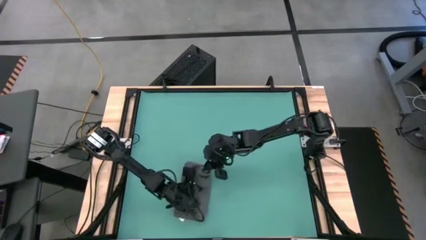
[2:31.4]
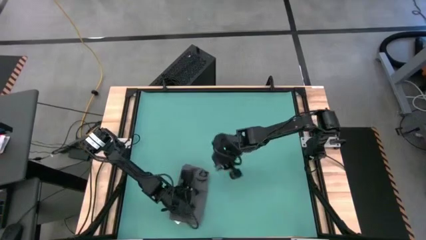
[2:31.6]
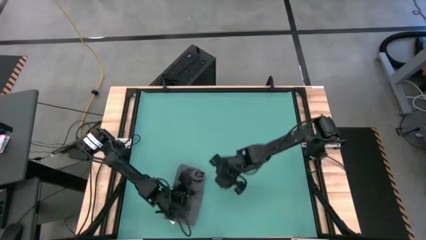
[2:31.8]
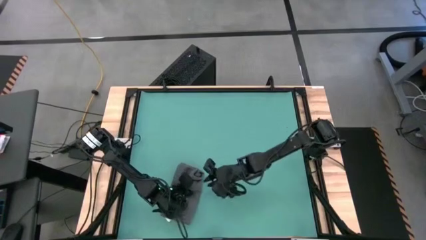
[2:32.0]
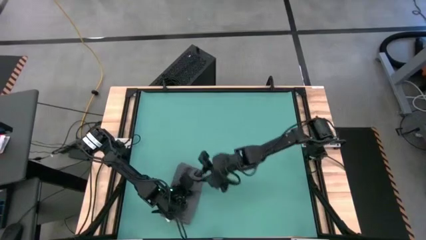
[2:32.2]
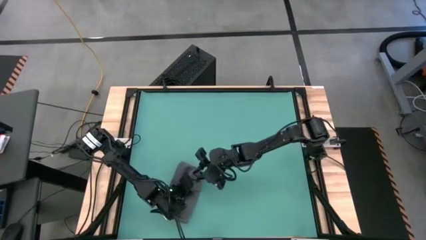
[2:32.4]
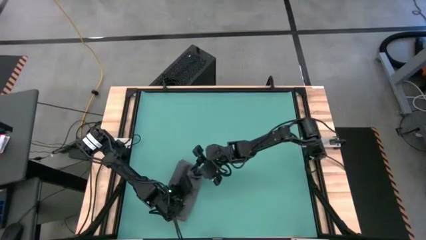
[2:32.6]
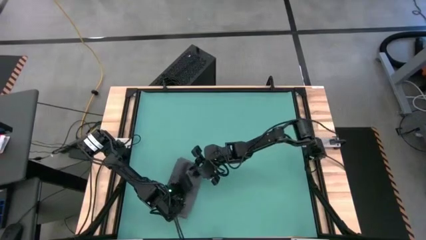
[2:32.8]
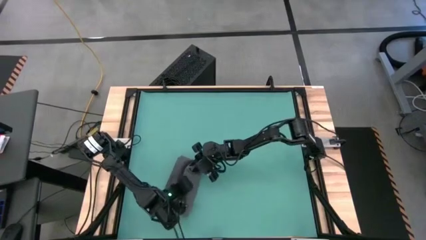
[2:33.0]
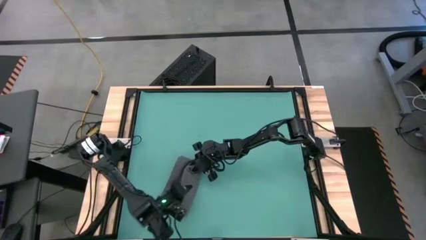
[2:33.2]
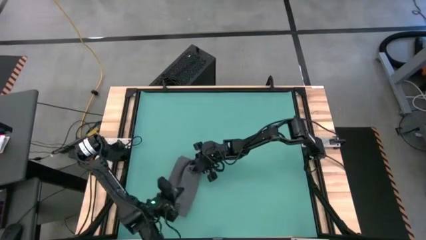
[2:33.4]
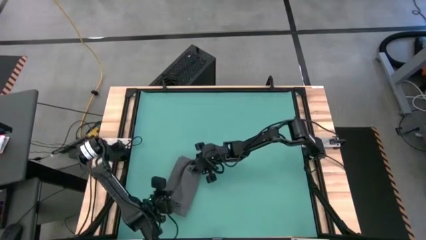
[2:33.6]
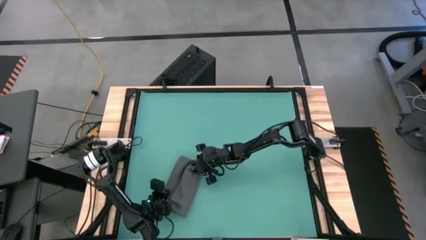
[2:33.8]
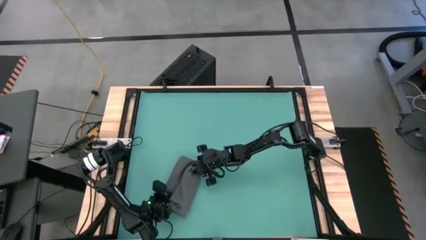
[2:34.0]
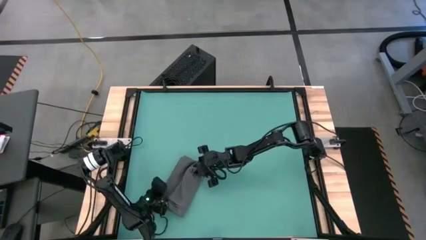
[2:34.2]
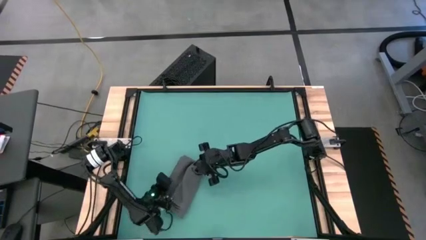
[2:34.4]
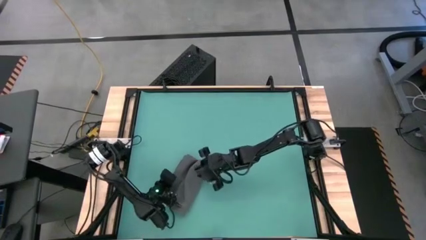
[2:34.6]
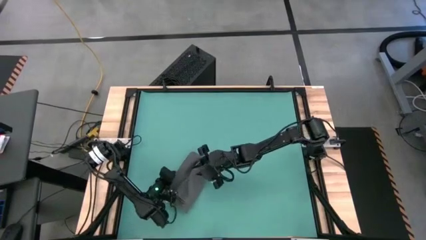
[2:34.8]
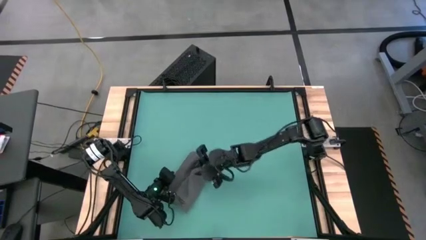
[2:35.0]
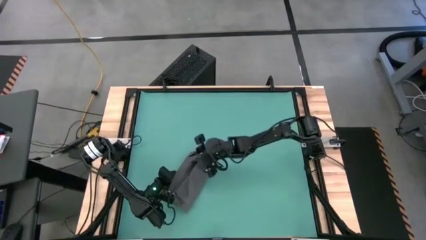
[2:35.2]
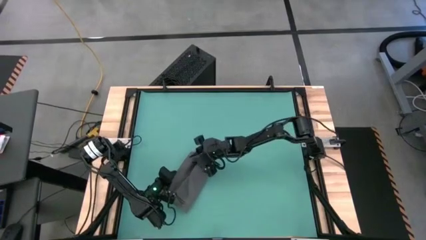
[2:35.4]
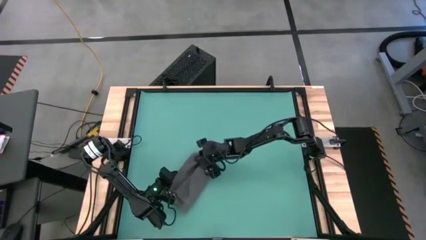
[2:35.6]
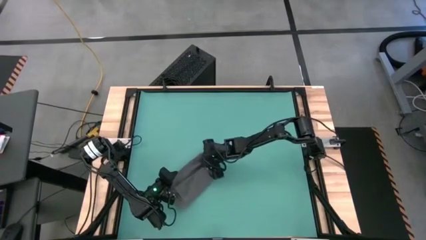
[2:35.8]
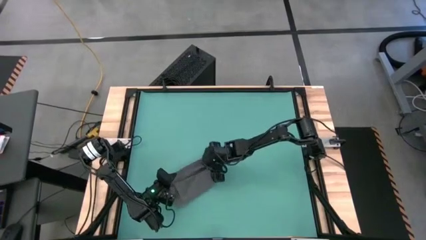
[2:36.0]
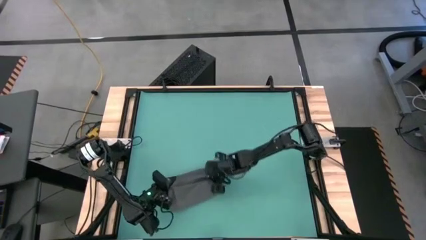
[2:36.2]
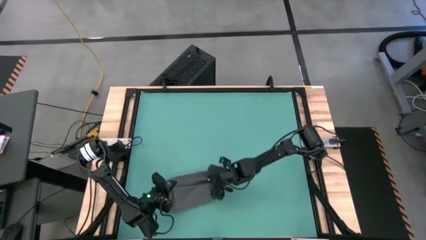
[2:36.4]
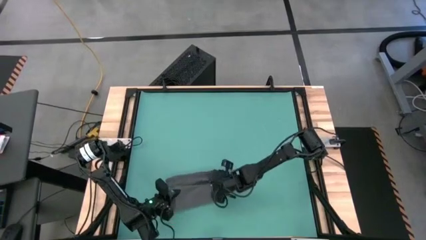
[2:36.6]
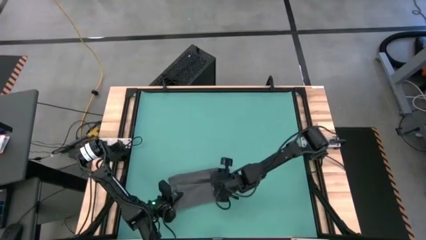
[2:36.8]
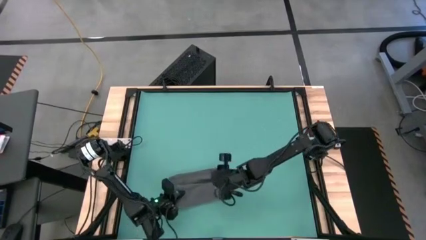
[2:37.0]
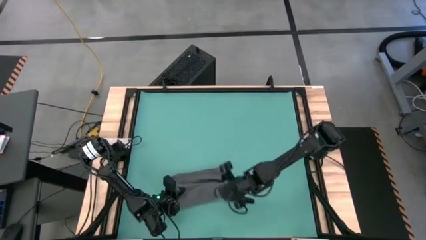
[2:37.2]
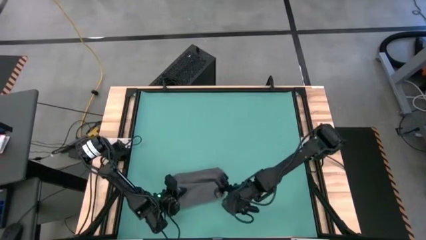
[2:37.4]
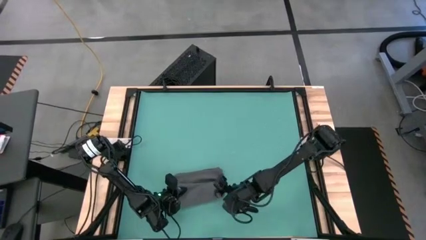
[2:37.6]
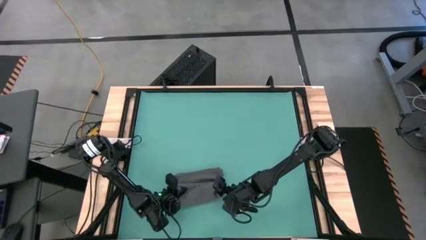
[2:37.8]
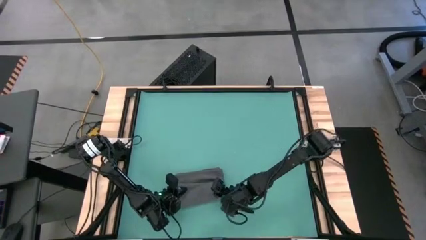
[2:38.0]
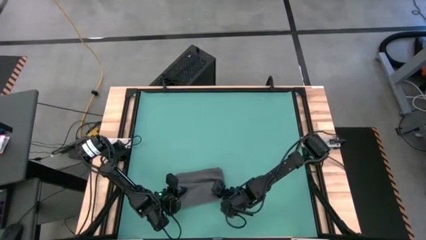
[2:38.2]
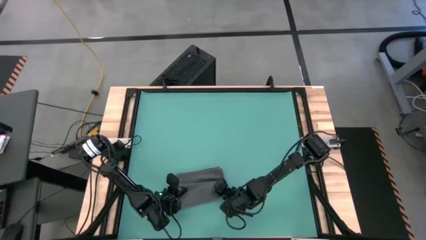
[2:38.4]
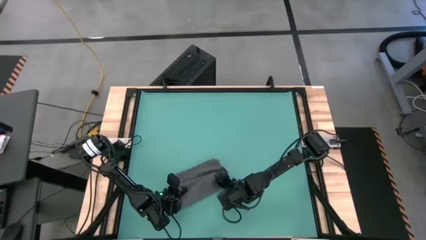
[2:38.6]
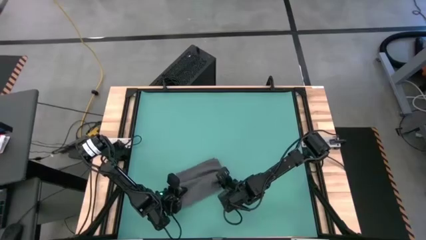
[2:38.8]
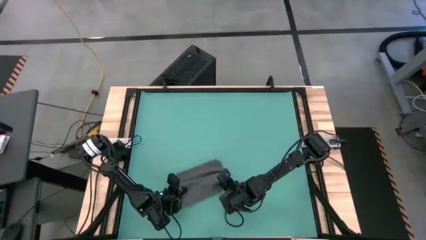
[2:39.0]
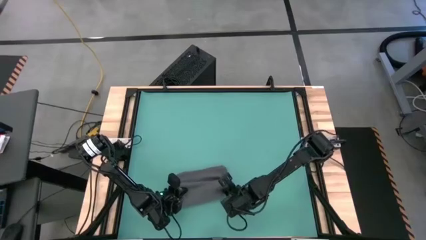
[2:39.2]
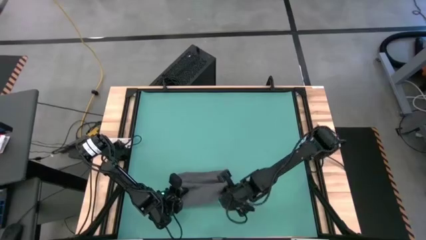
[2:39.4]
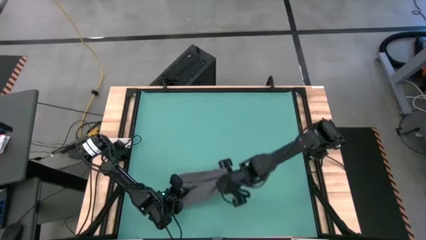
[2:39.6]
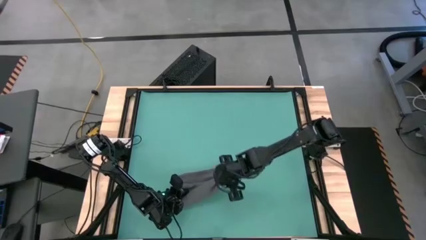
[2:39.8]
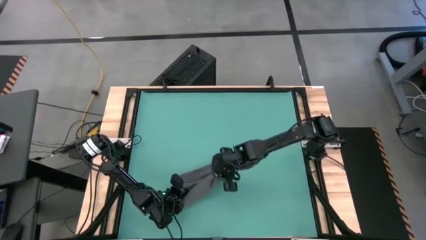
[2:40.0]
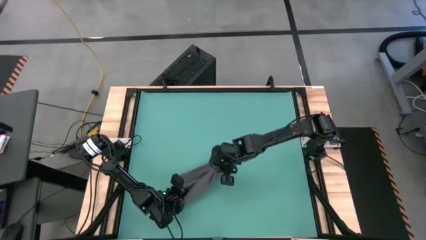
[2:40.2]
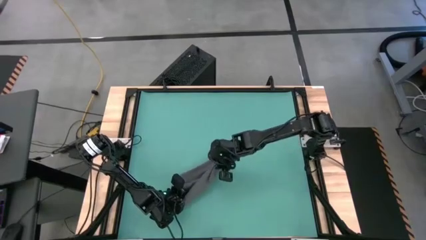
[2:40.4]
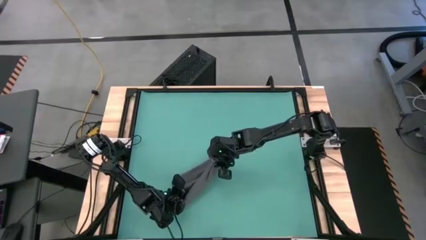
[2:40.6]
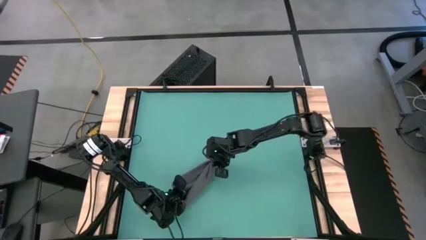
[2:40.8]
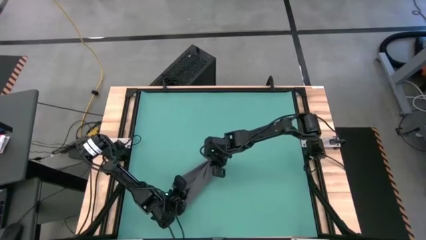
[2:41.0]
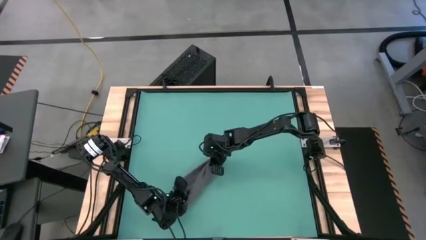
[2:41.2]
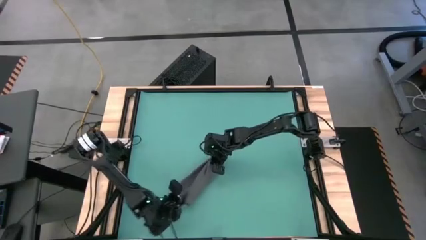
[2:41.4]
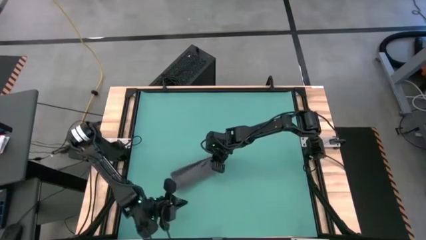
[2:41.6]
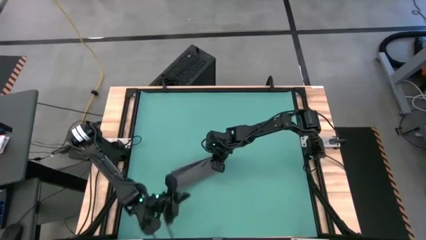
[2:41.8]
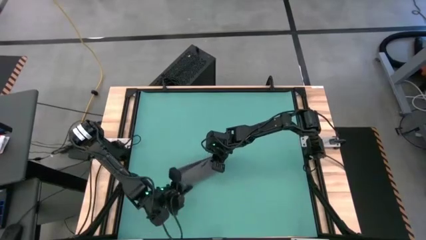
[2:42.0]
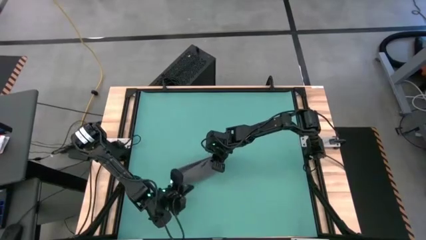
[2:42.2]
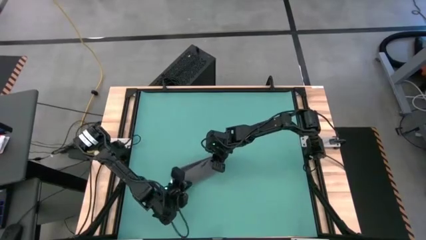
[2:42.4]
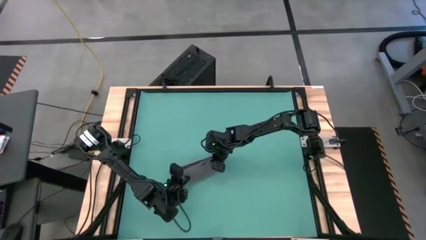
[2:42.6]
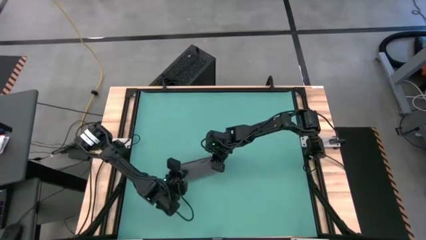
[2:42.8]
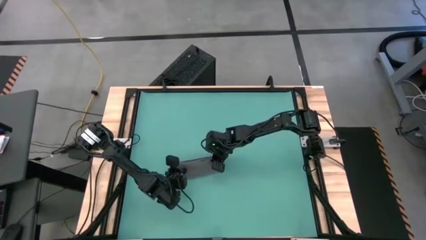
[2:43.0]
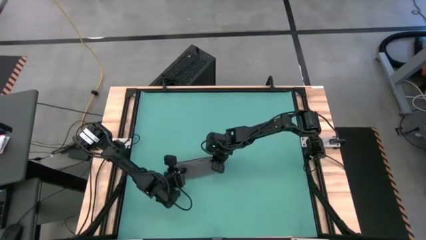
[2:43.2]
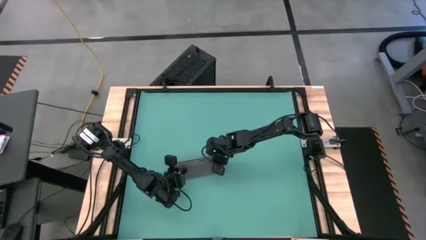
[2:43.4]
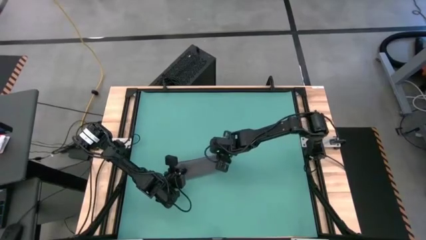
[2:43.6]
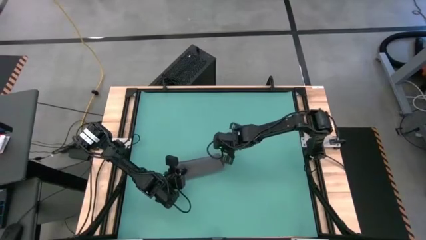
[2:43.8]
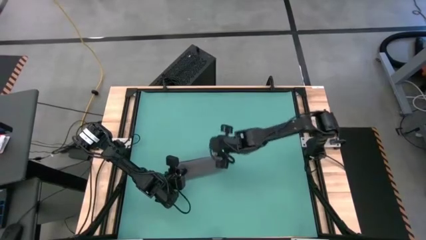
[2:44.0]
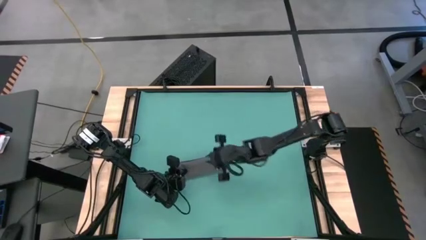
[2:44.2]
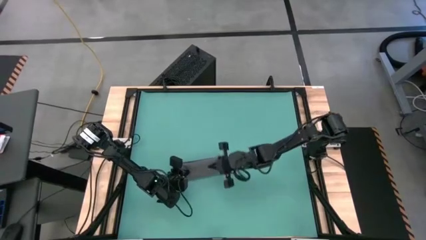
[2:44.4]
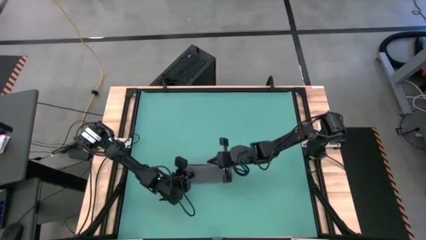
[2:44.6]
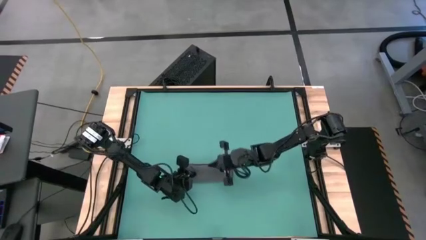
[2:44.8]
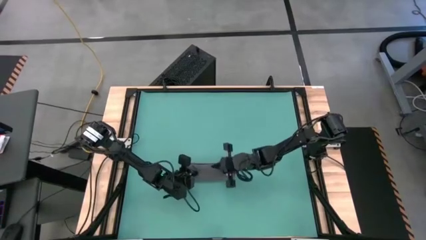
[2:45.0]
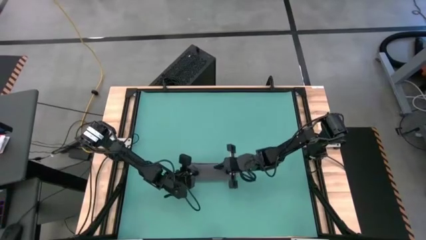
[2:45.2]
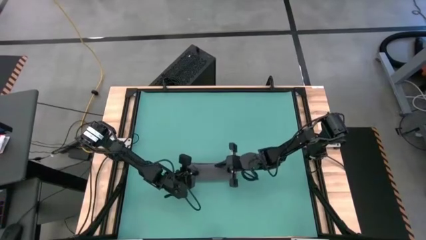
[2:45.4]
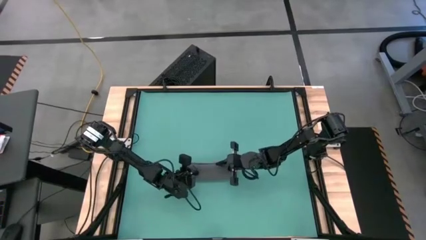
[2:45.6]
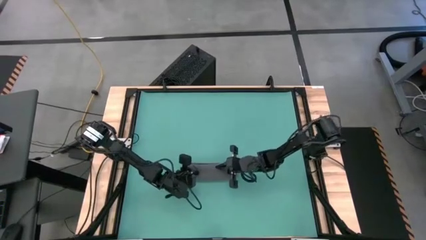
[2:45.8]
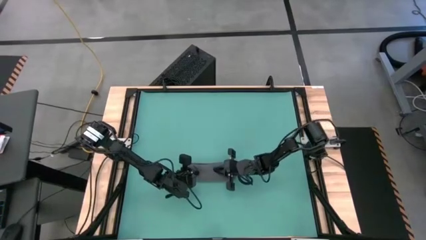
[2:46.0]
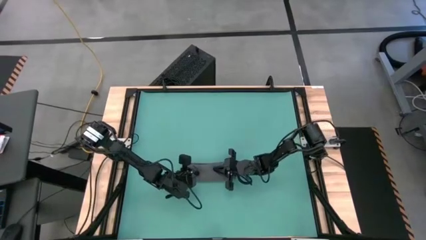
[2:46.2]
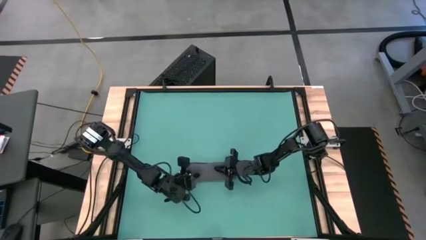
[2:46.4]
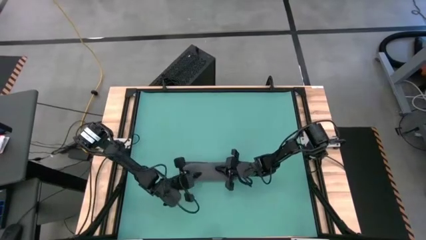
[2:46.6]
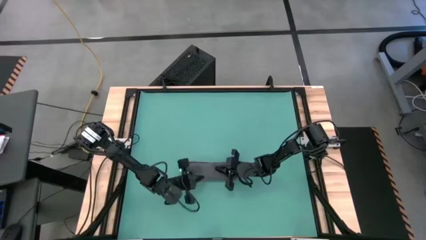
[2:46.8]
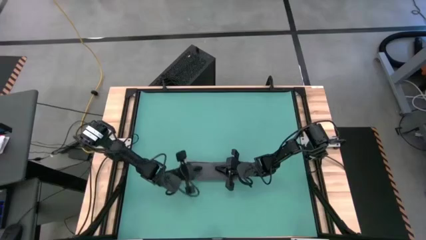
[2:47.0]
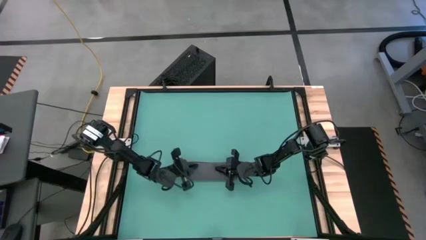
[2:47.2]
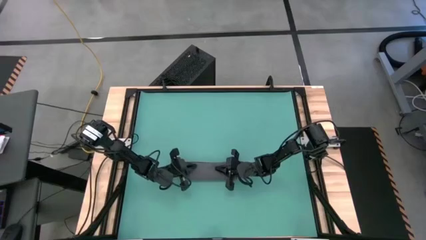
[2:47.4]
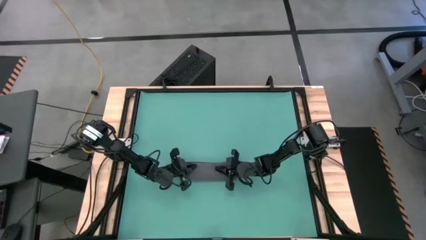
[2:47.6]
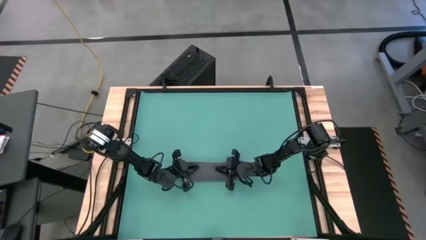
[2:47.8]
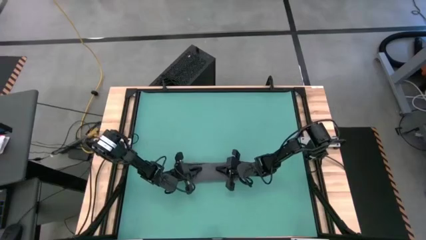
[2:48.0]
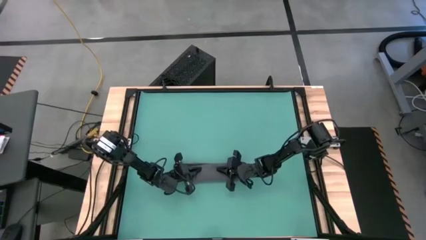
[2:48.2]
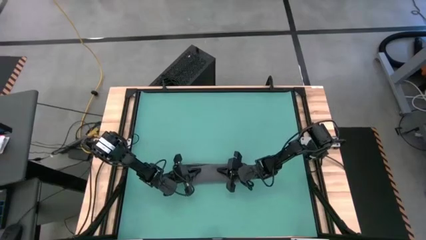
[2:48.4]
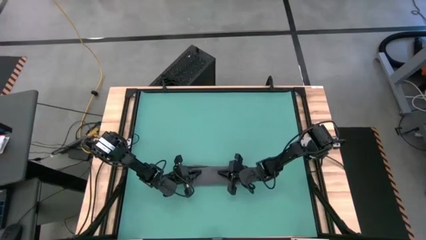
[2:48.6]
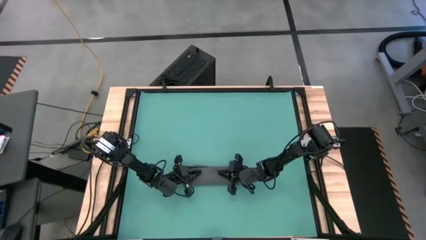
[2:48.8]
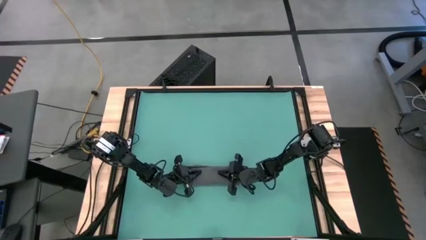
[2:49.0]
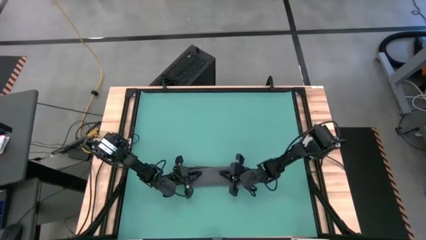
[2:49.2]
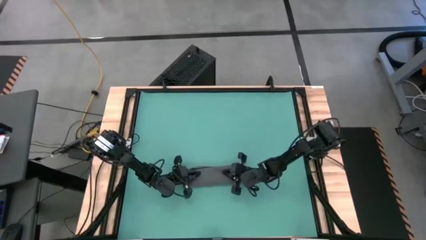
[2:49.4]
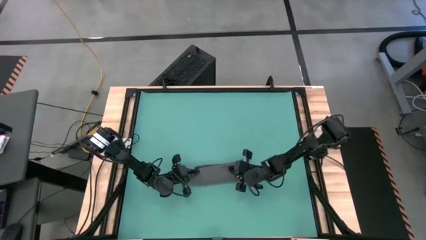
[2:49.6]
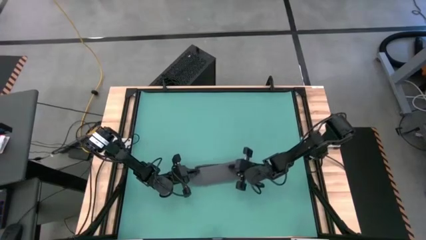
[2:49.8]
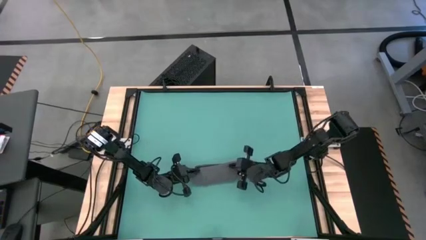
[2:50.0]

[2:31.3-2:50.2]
Task: Roll towel
Roll the gray towel
